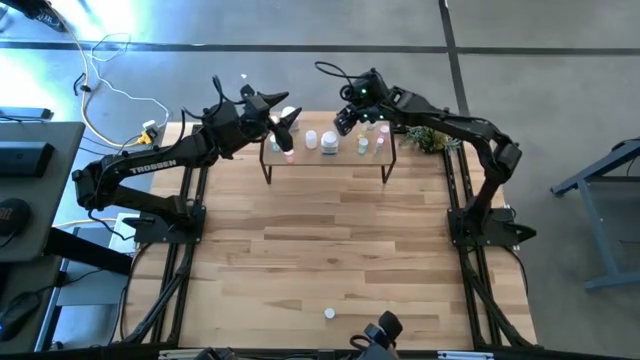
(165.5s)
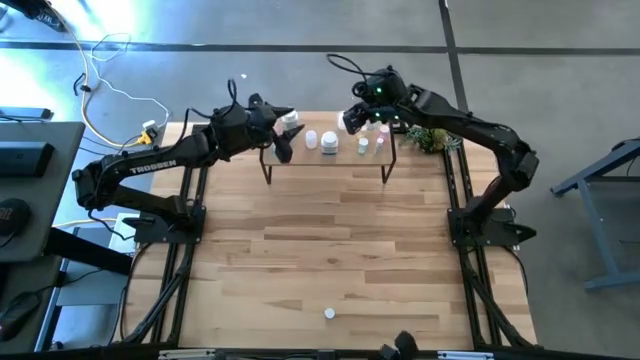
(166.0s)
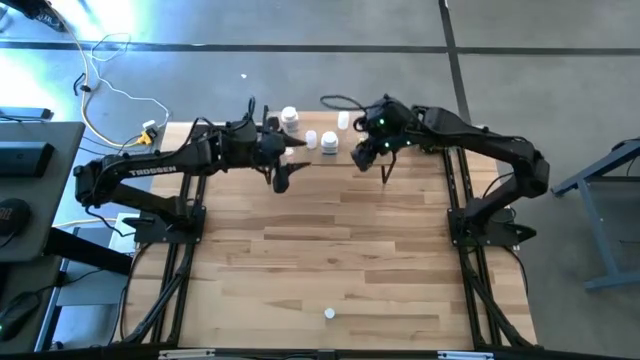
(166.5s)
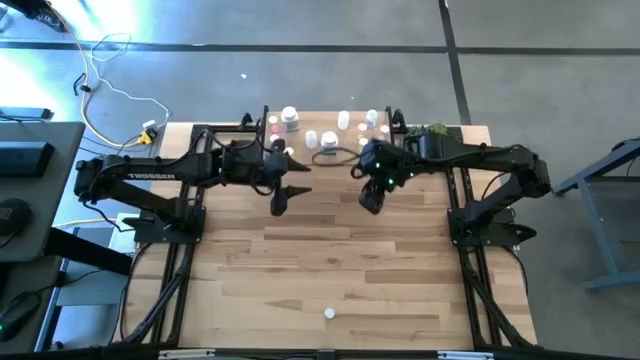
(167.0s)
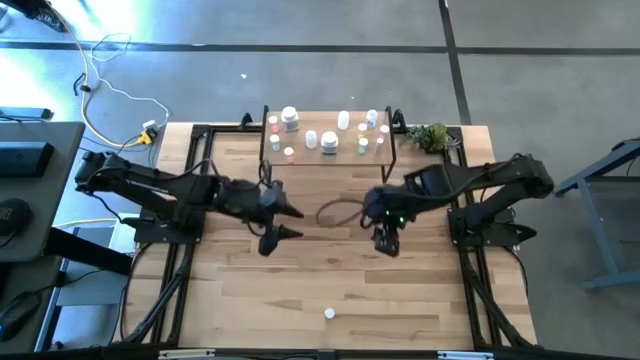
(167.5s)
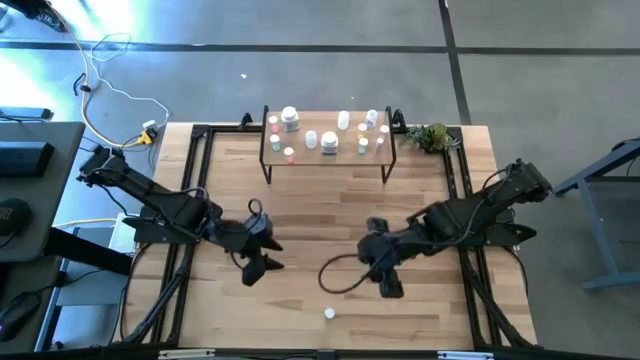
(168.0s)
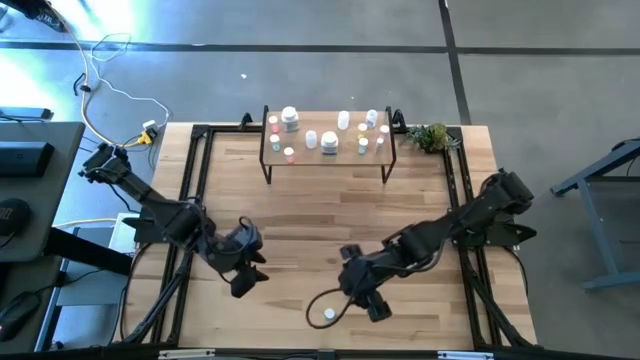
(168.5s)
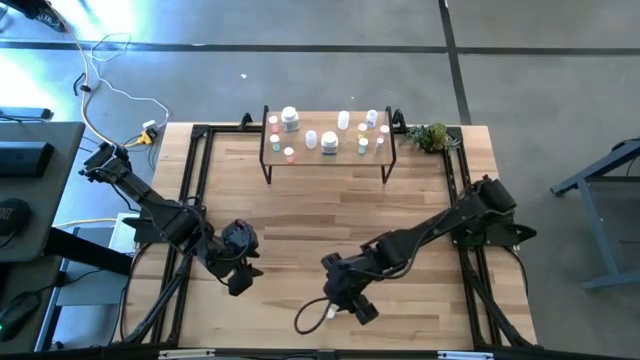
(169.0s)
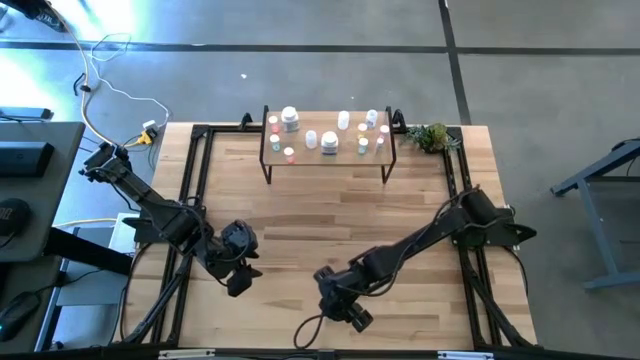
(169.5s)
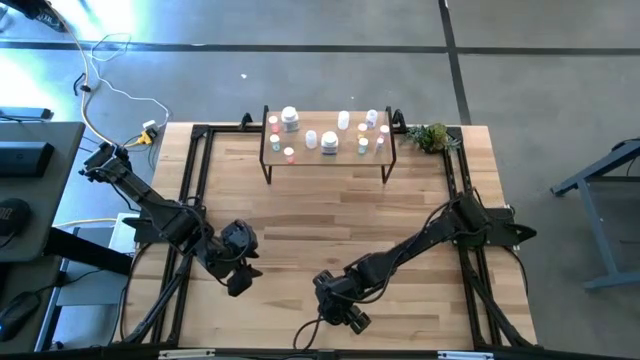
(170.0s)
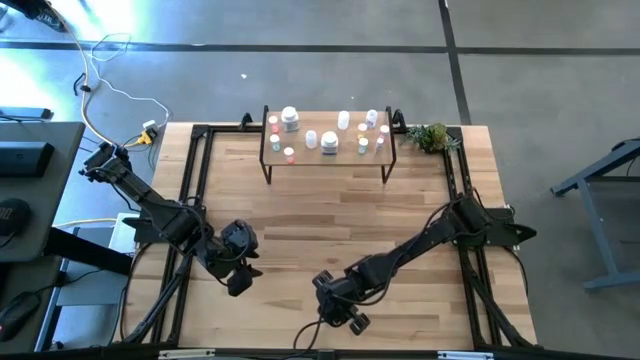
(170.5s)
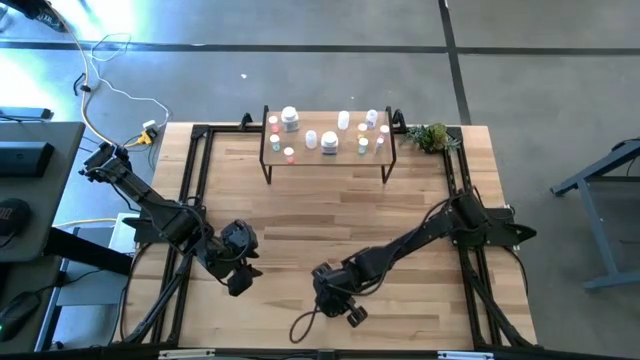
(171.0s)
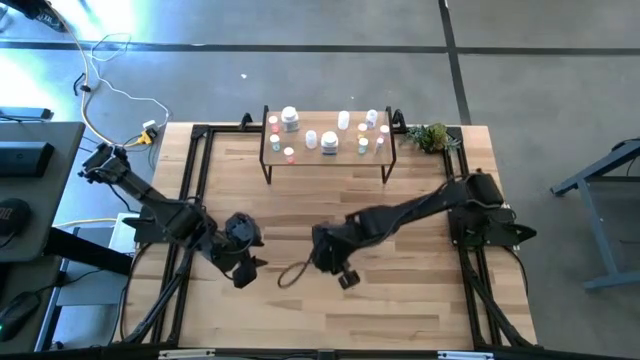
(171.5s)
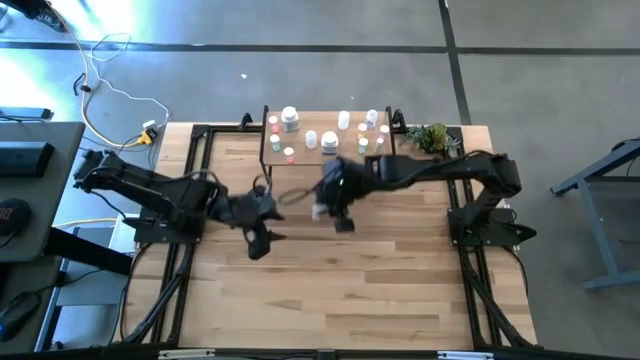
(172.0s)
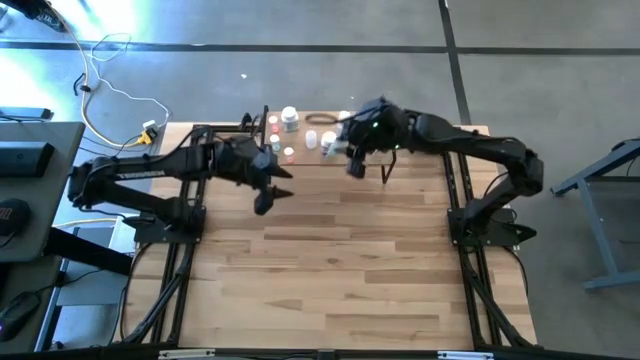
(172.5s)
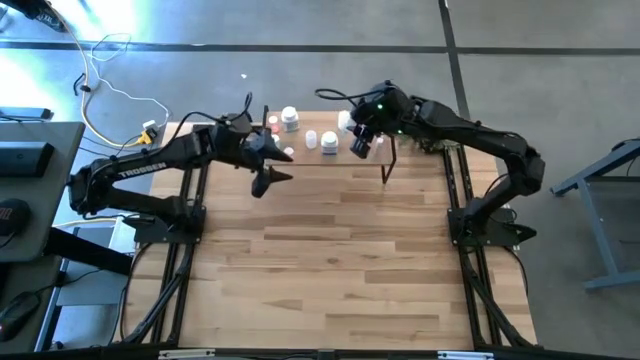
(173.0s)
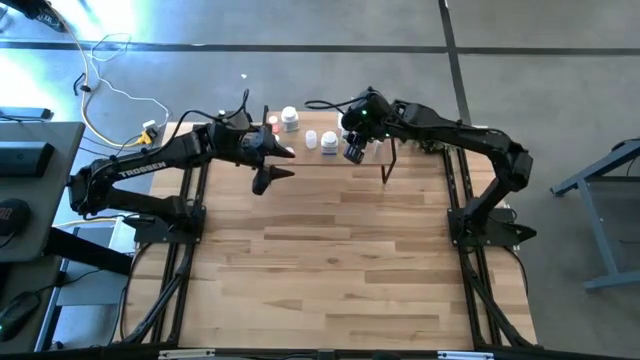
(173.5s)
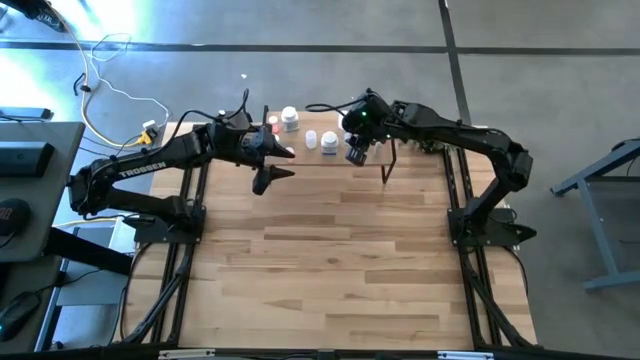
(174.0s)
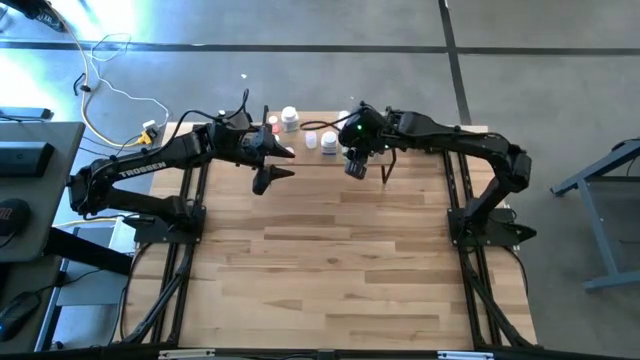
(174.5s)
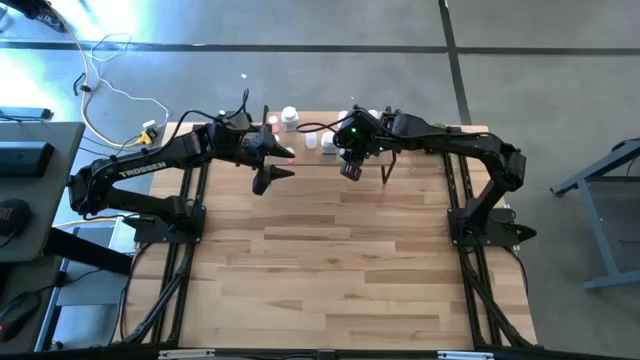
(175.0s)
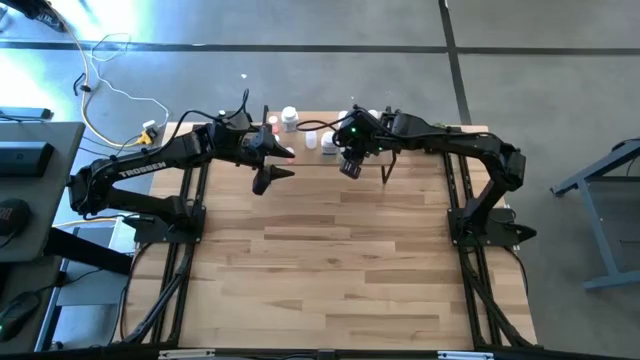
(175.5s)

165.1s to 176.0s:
Task: Pick and place medicine bottles onto shelf by color
Put the blue pill bottle on the shelf

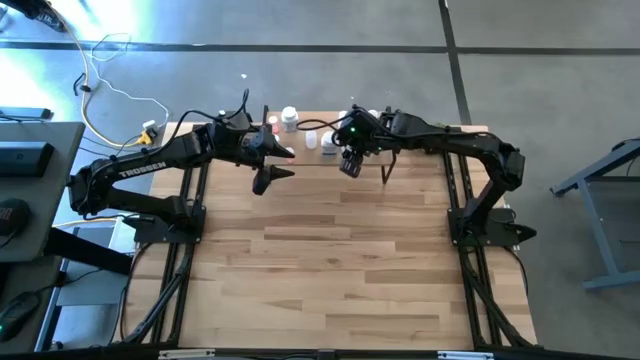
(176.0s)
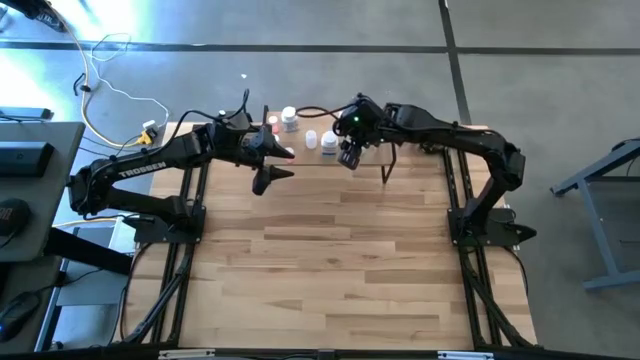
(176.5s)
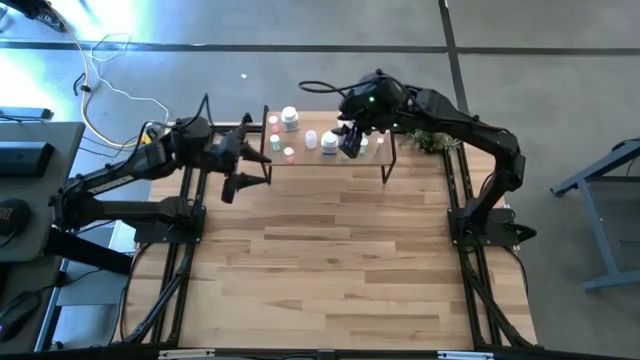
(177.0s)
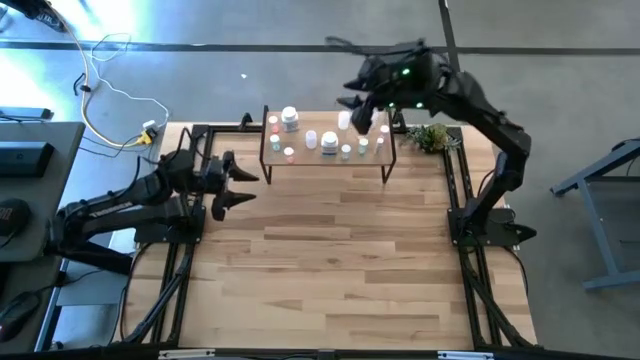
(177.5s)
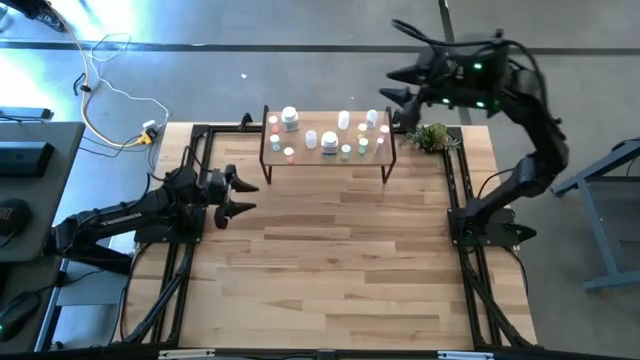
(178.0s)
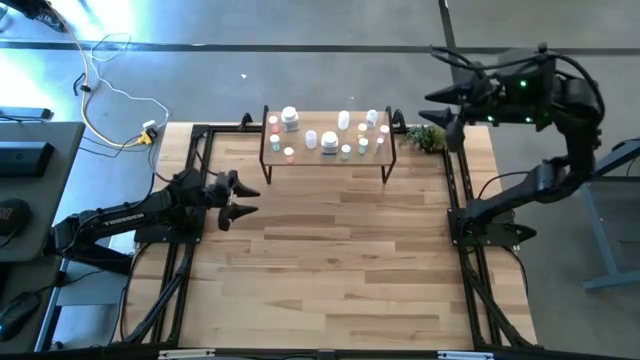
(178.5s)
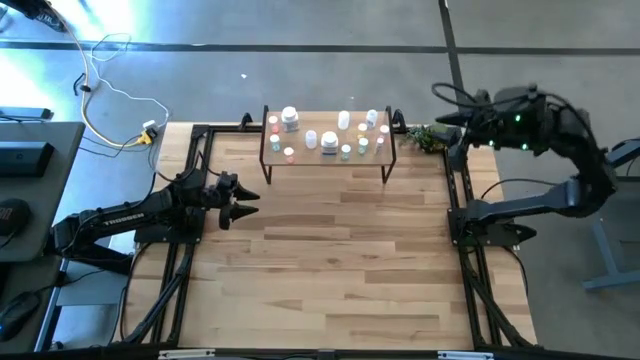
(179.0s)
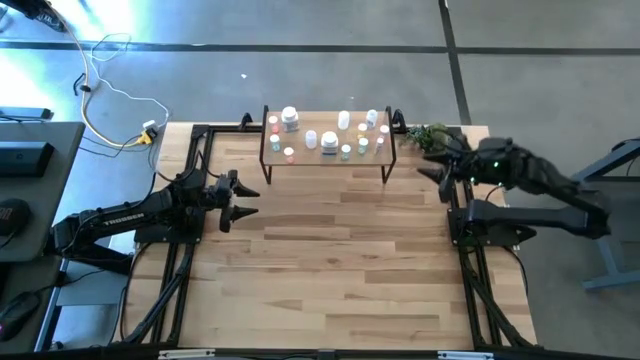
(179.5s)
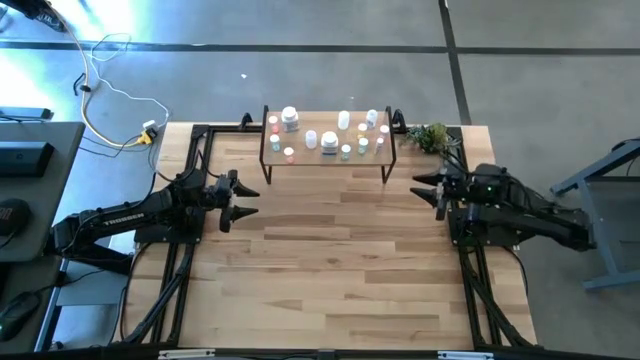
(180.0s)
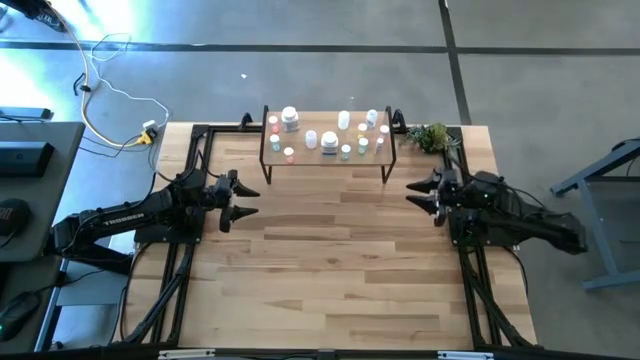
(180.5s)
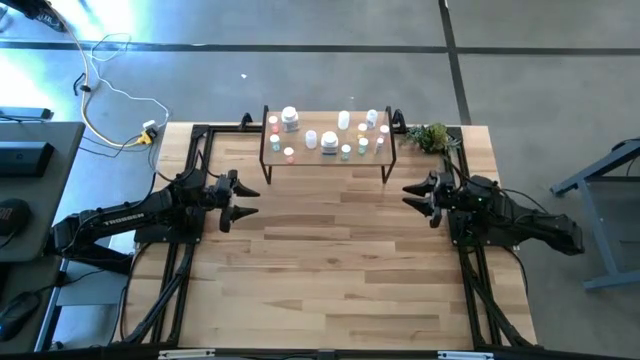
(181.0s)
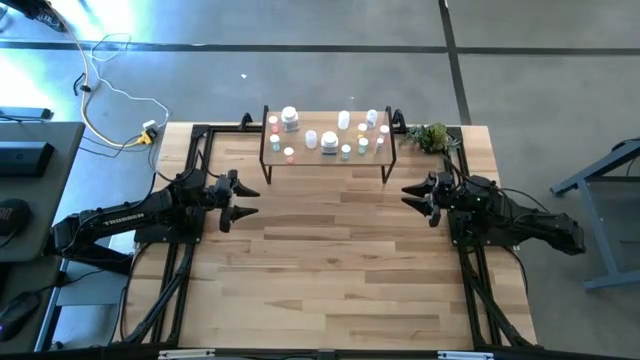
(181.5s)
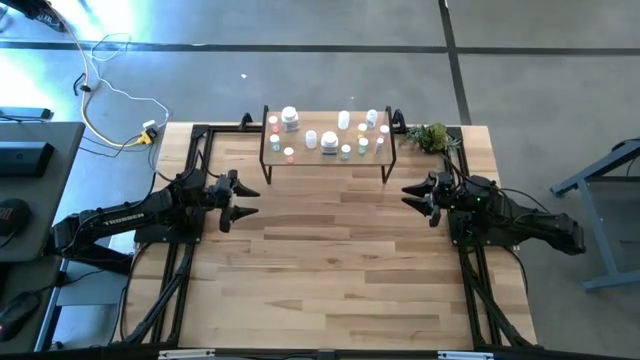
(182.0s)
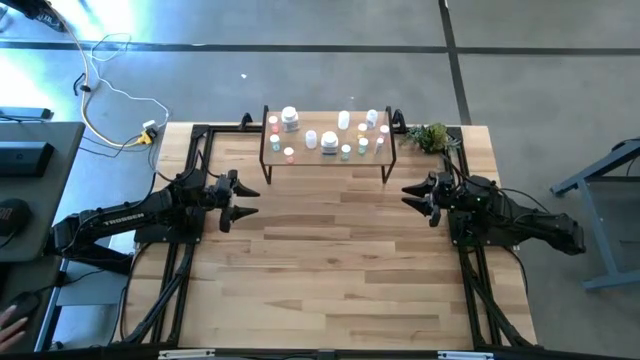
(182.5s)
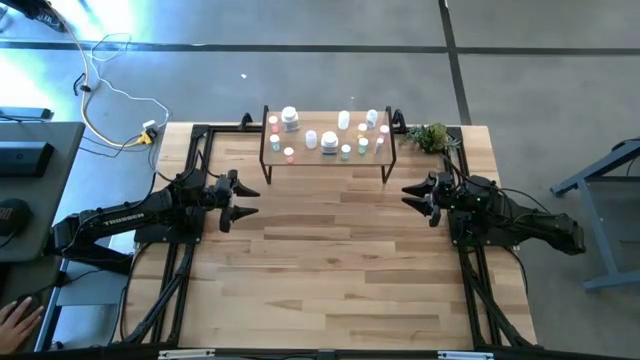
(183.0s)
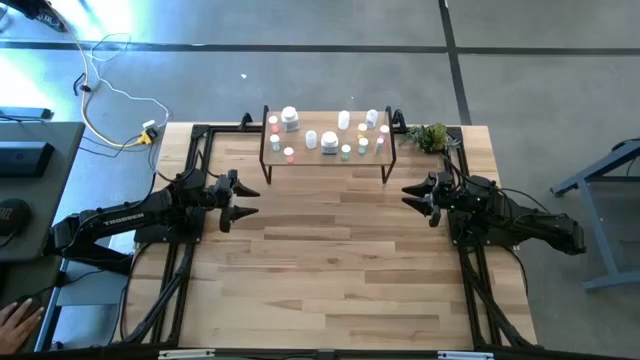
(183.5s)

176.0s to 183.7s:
Return to Home Position

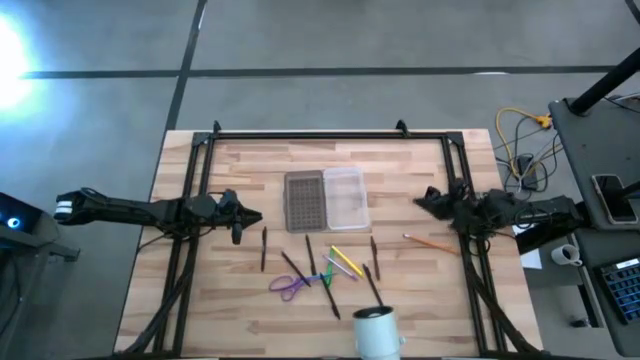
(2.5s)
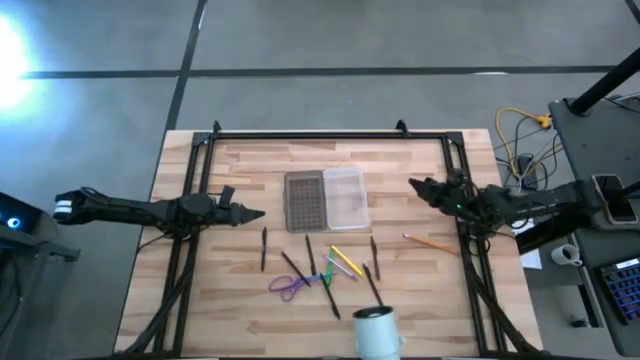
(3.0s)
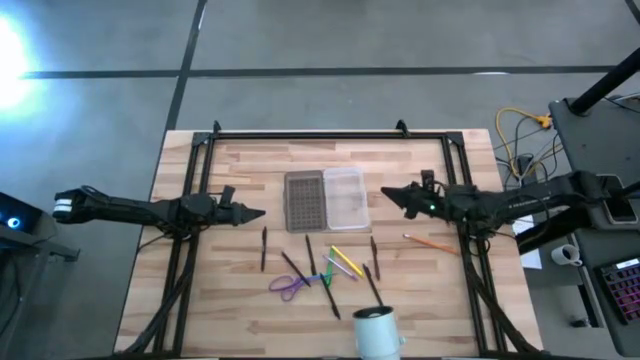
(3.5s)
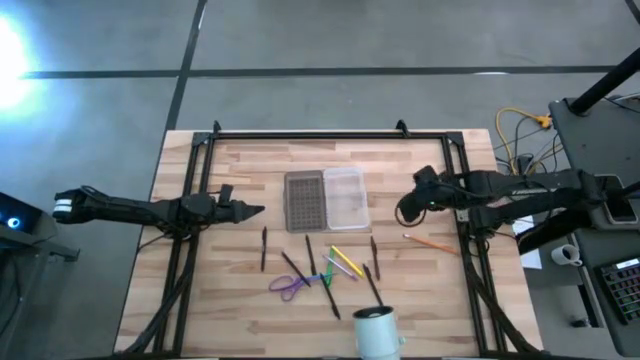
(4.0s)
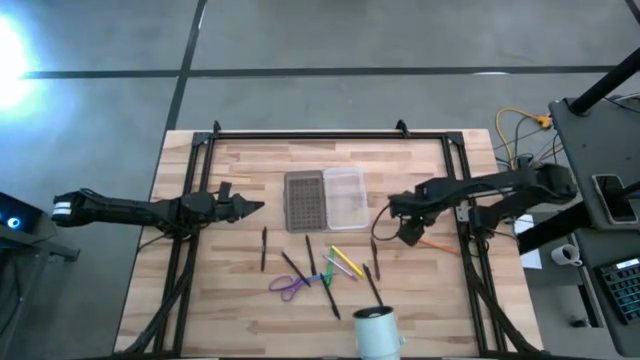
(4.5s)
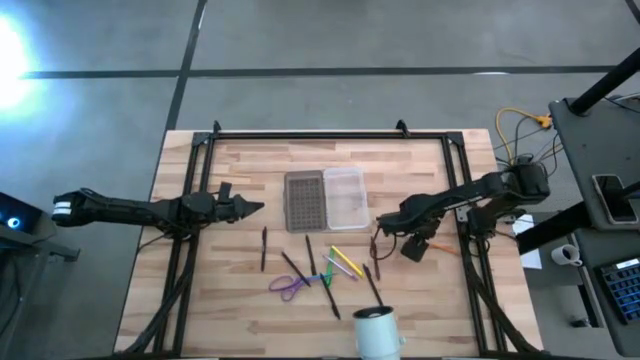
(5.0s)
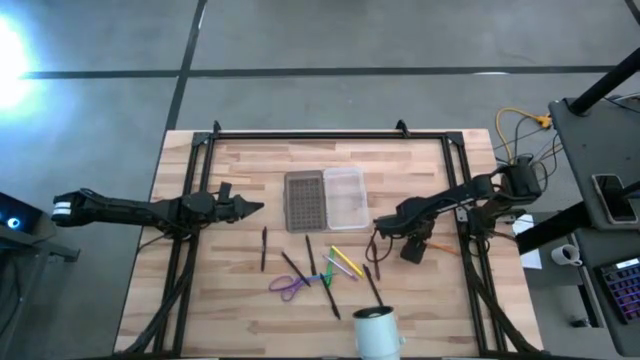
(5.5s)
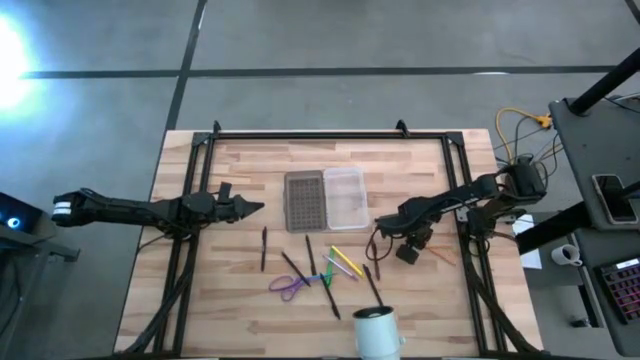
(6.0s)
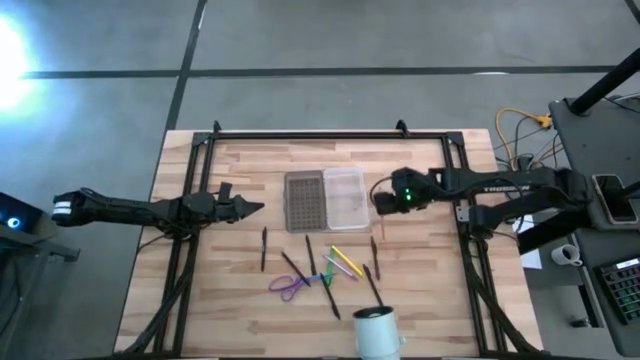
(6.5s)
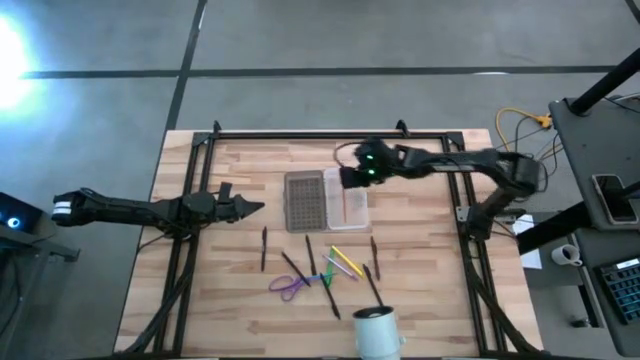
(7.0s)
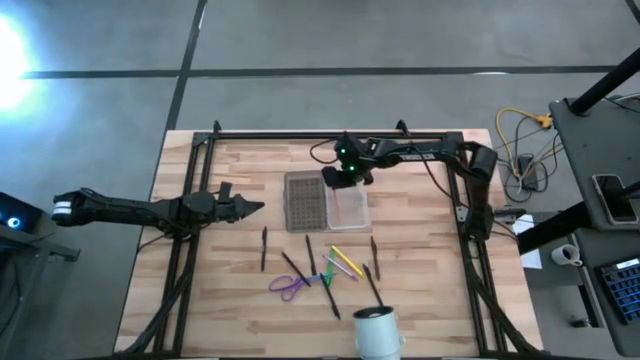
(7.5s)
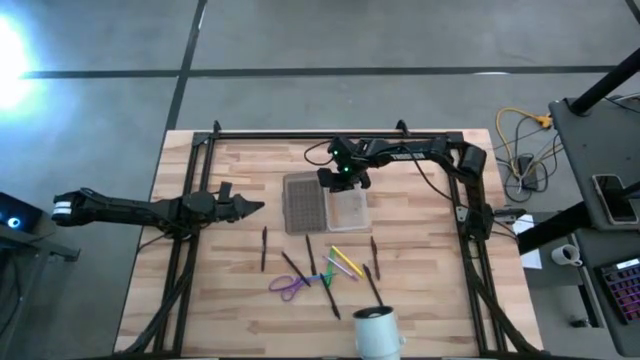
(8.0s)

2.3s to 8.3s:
Task: Pick & place school supplies into a supply box
Put the orange pencil into the gray supply box
